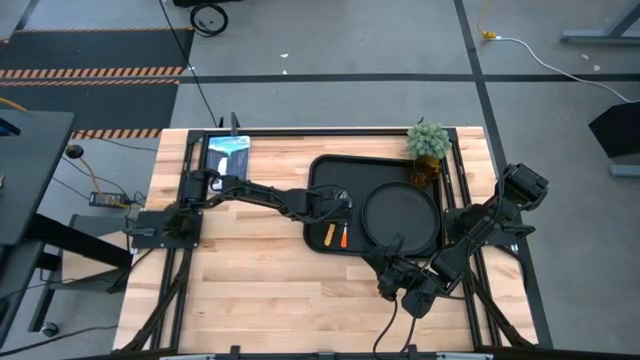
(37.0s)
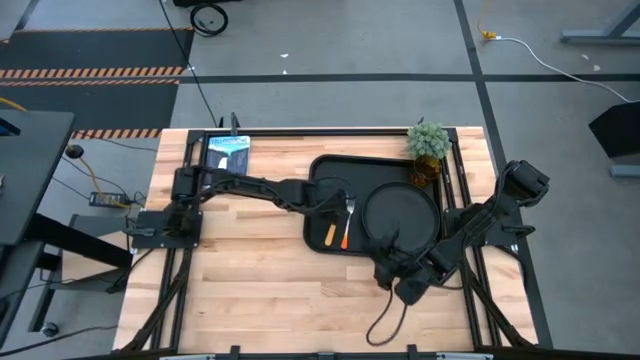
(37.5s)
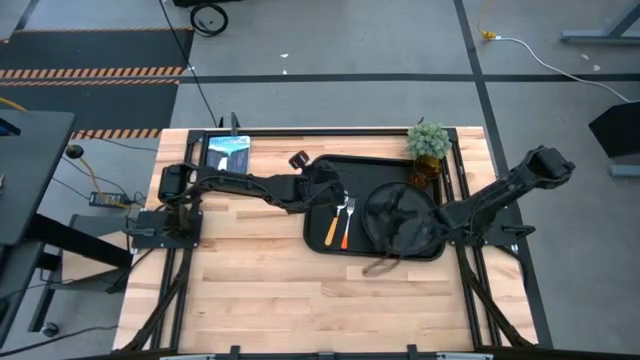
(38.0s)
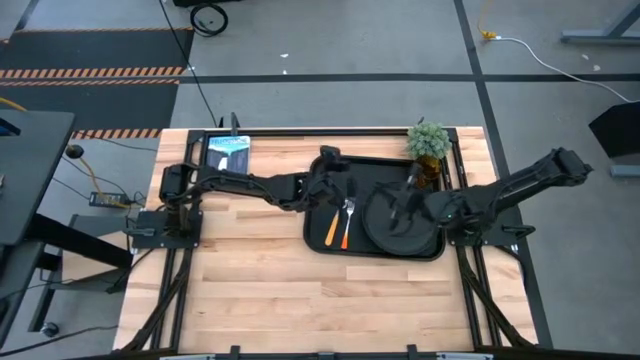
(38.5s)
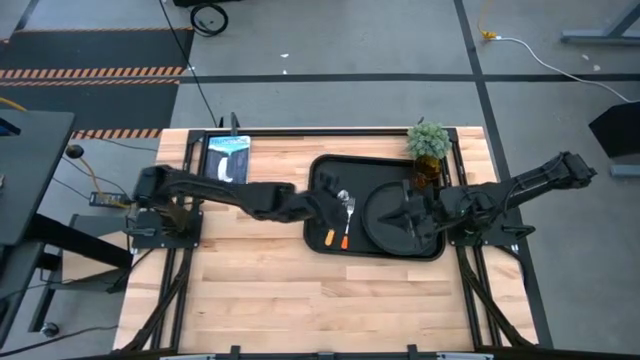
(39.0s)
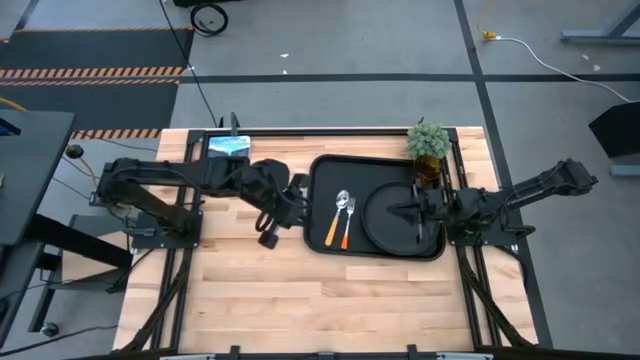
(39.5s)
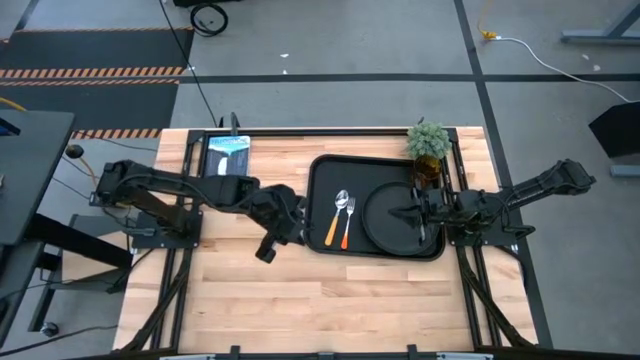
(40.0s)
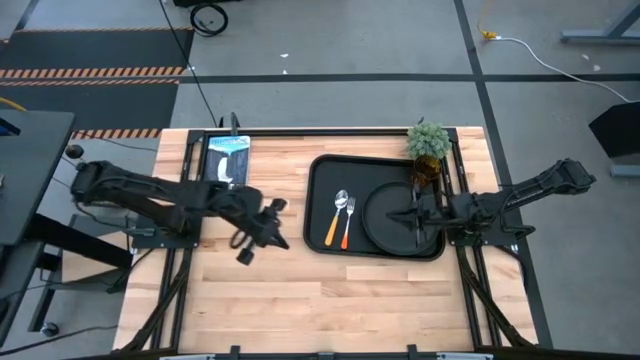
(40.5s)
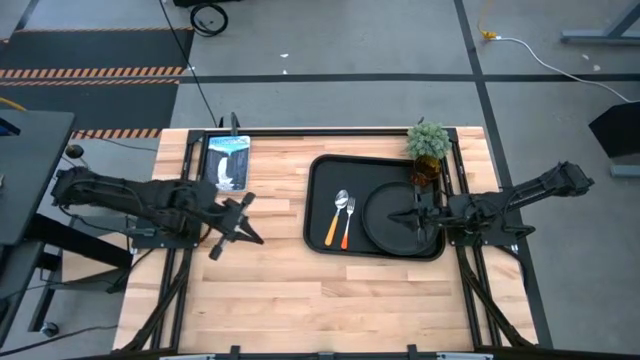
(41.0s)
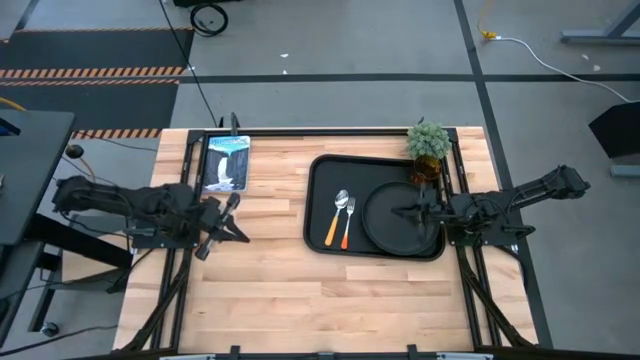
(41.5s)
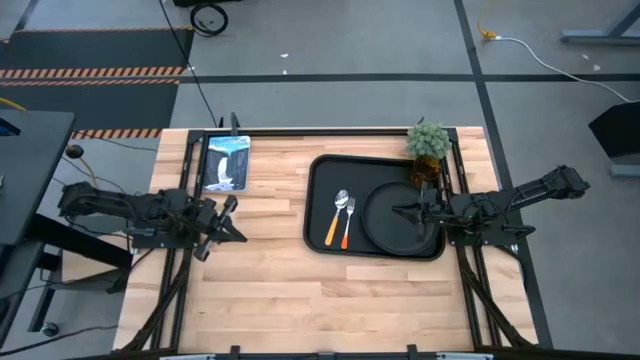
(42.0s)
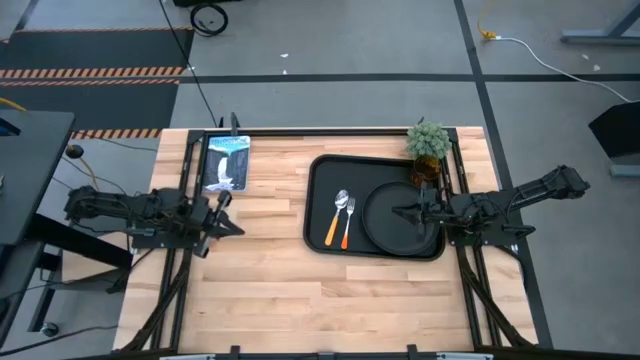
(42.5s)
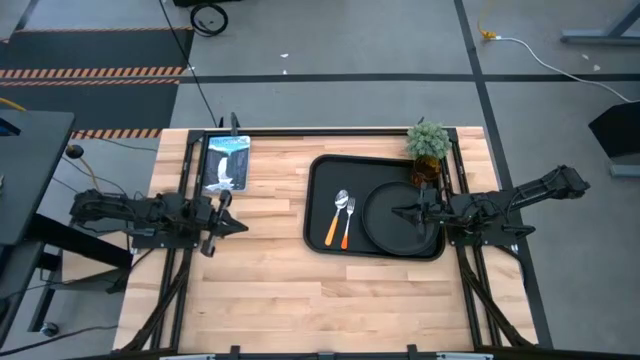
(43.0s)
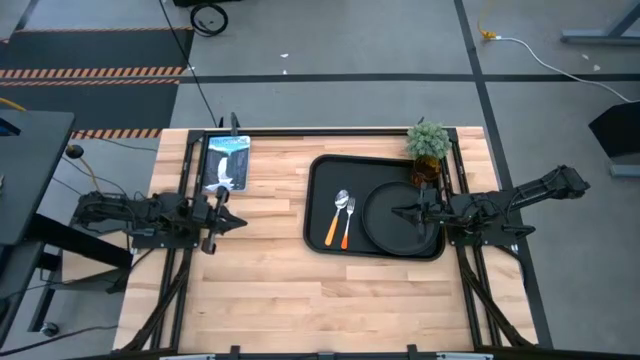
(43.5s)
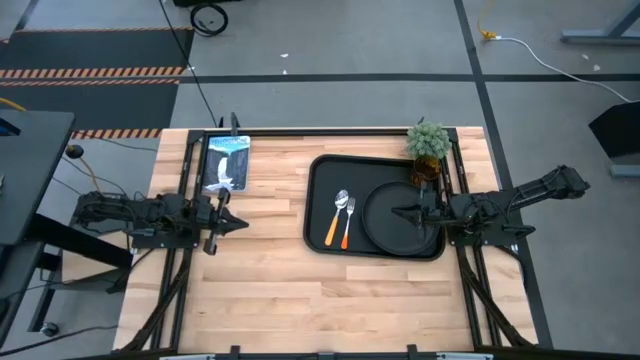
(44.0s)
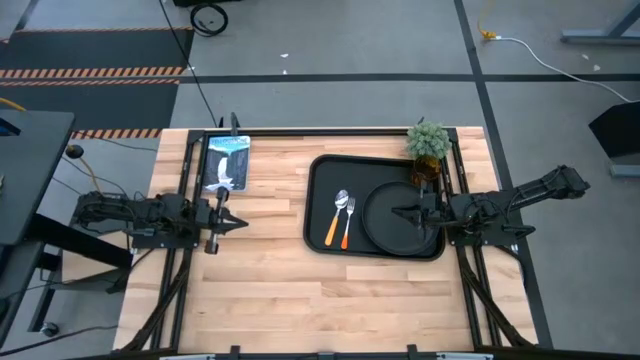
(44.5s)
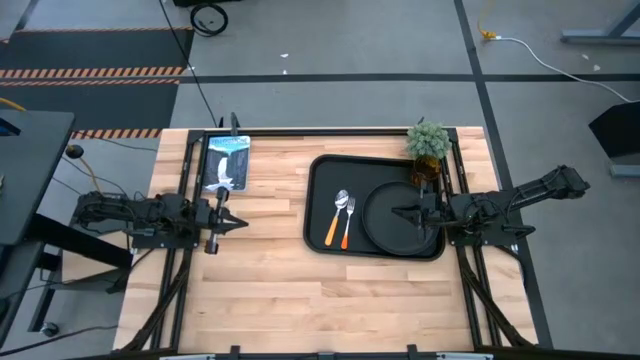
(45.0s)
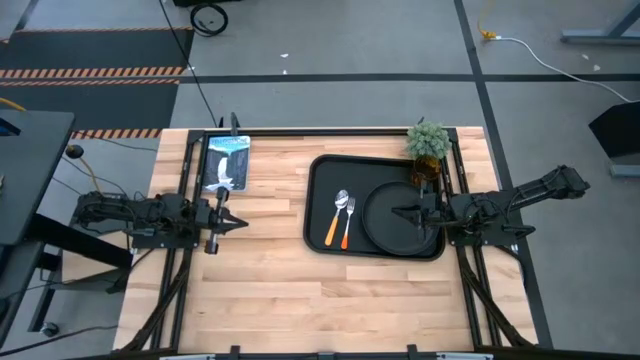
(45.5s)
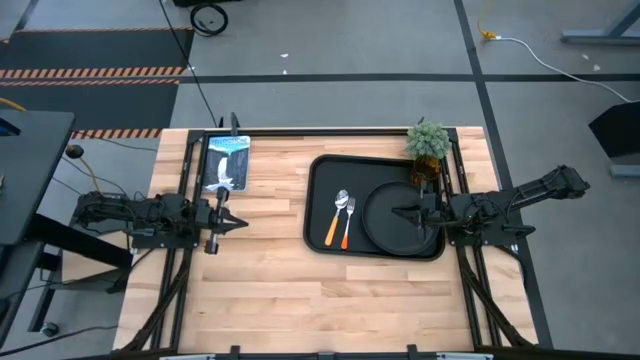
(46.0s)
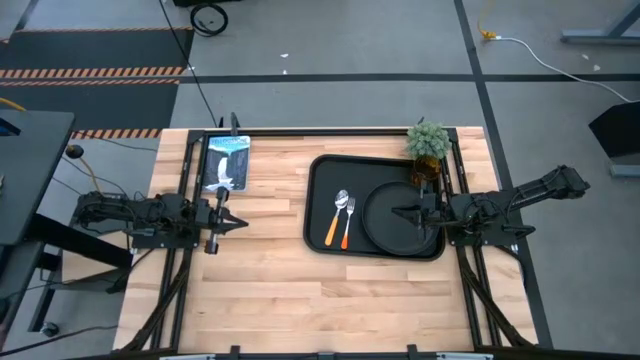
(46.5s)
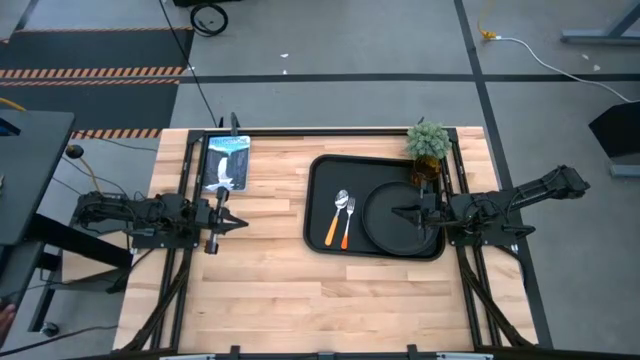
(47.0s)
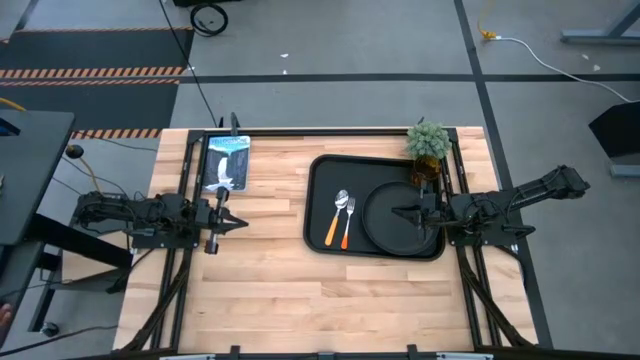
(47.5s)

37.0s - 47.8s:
Task: Pick and place plate/cup/fork/spoon on tray
Return to Home Position

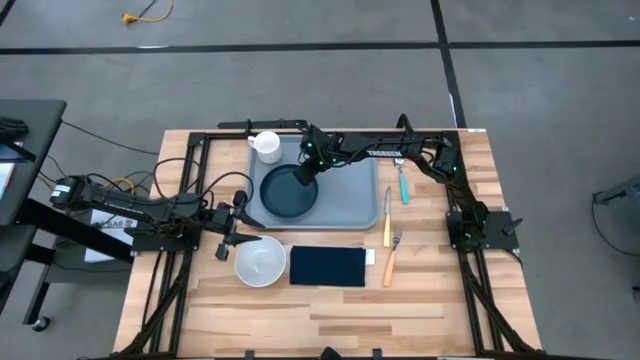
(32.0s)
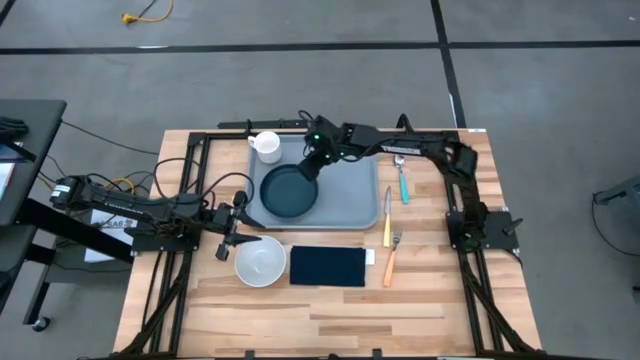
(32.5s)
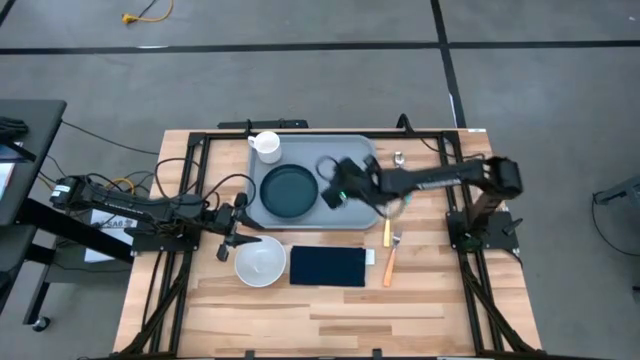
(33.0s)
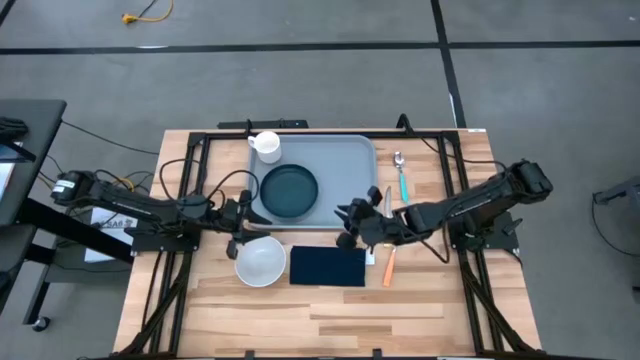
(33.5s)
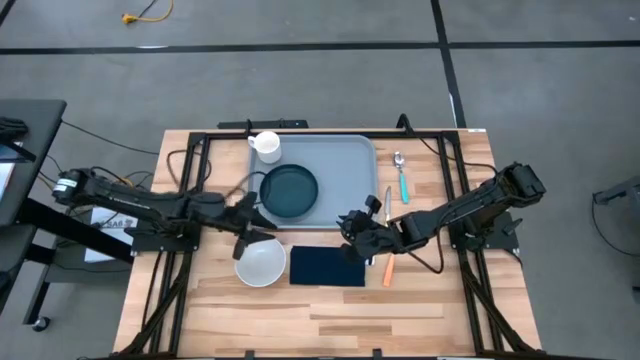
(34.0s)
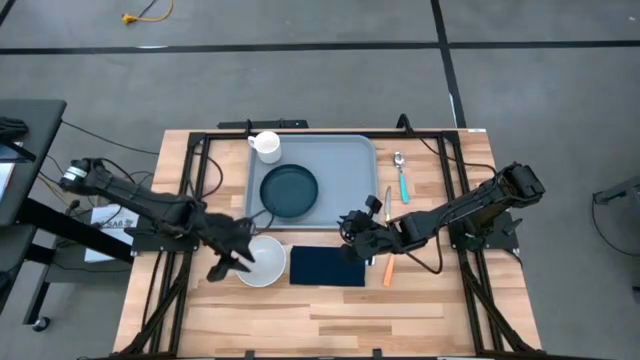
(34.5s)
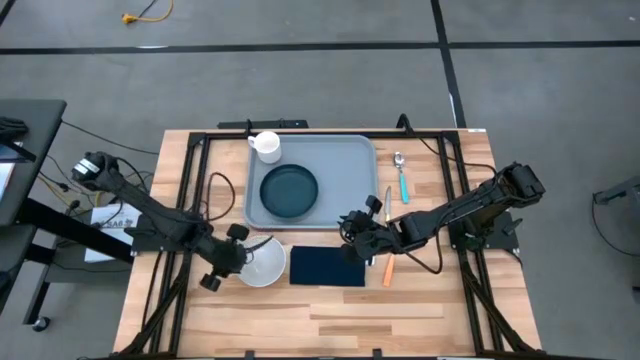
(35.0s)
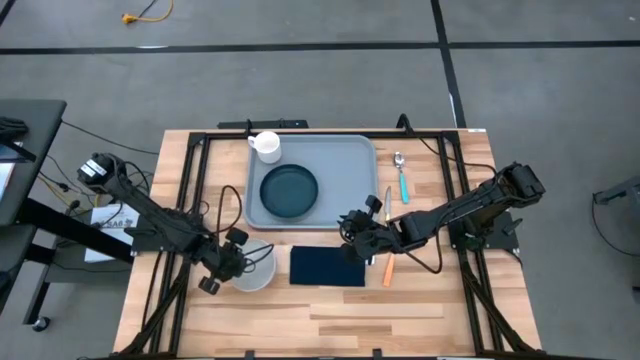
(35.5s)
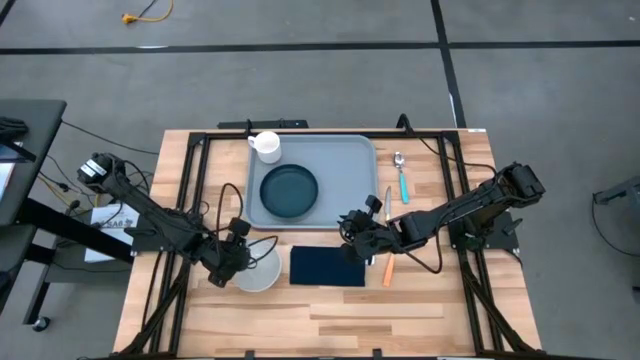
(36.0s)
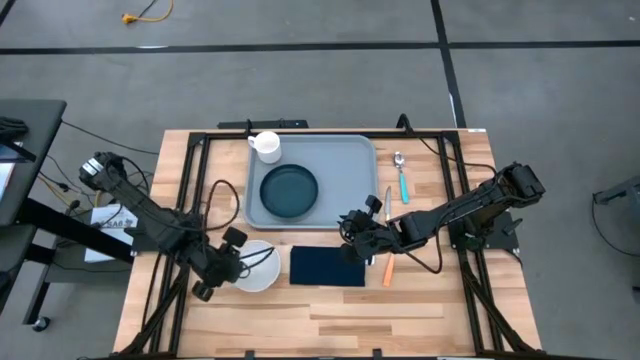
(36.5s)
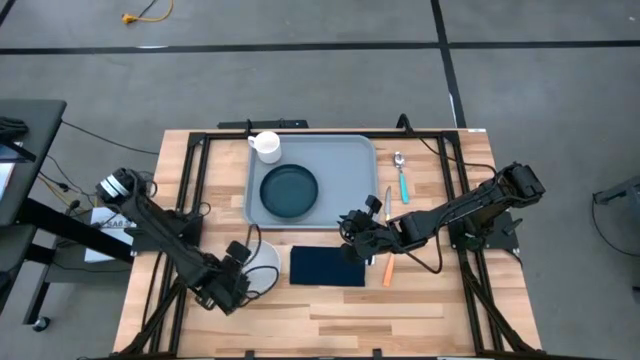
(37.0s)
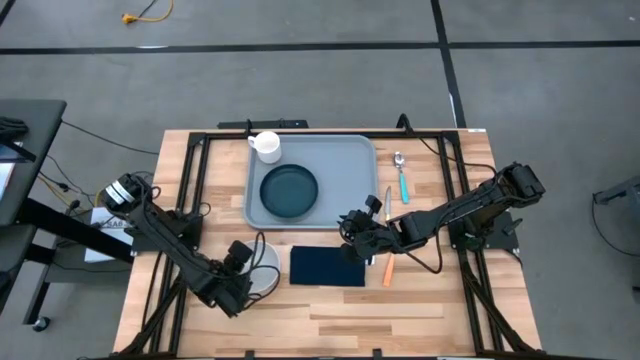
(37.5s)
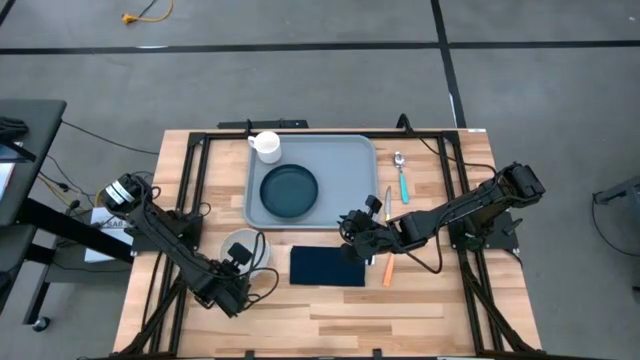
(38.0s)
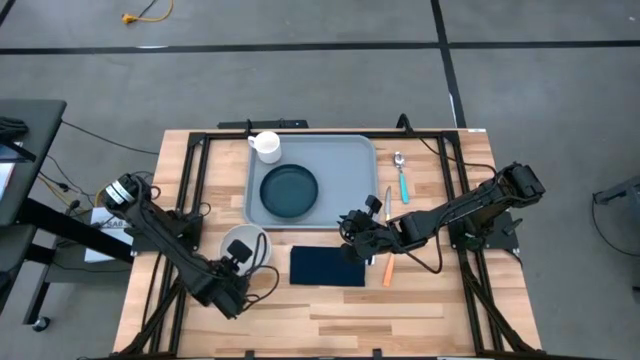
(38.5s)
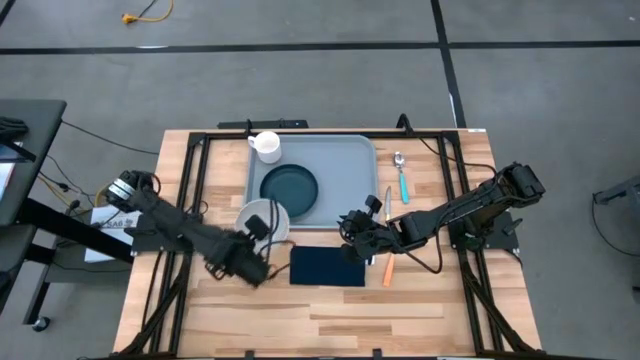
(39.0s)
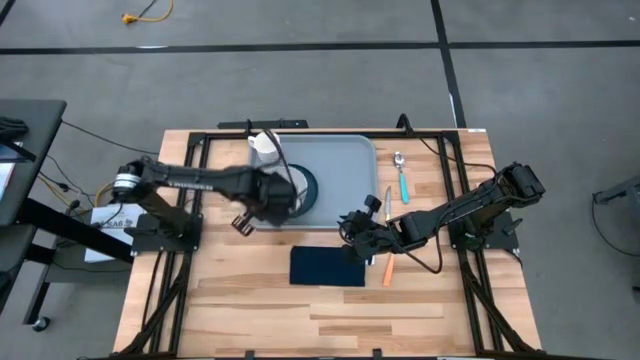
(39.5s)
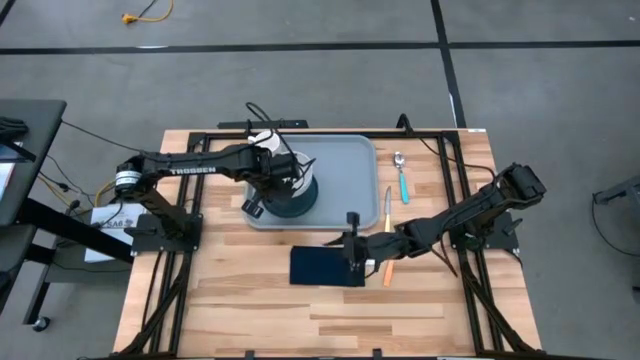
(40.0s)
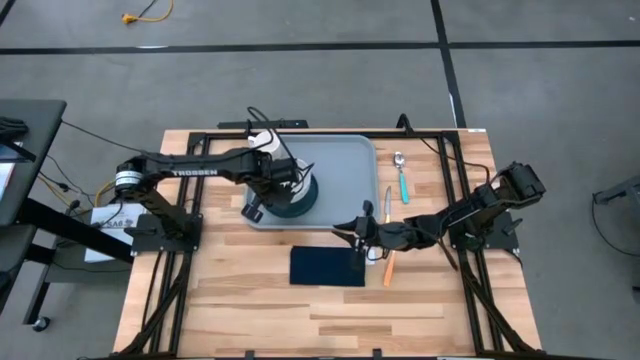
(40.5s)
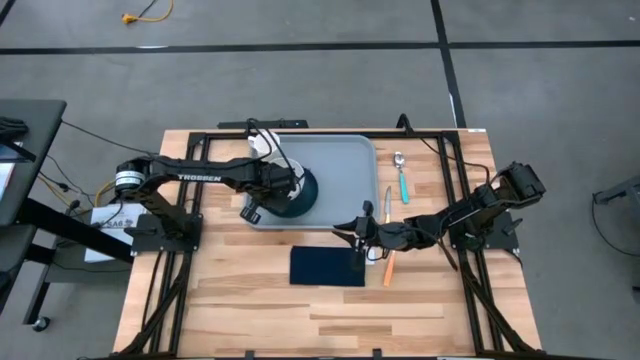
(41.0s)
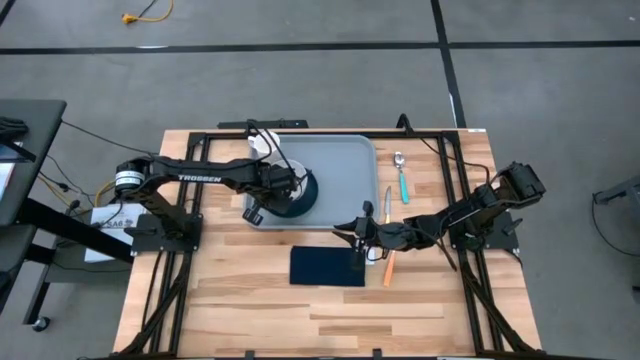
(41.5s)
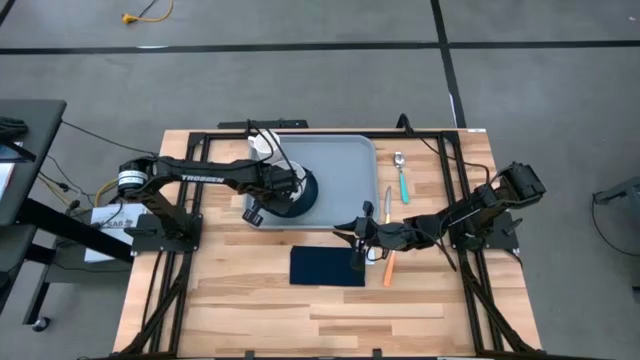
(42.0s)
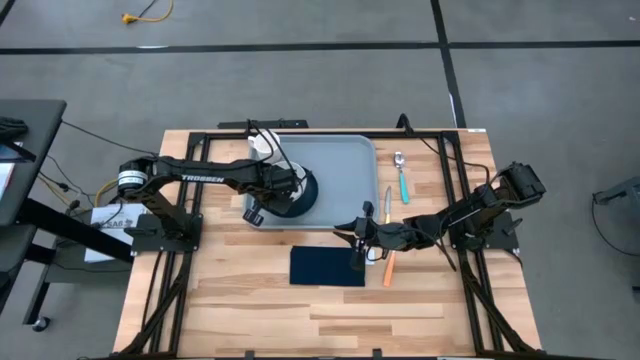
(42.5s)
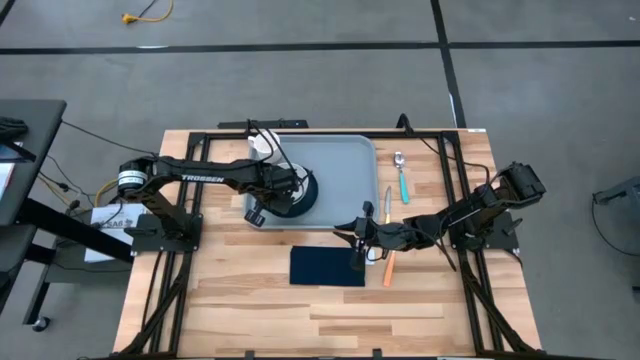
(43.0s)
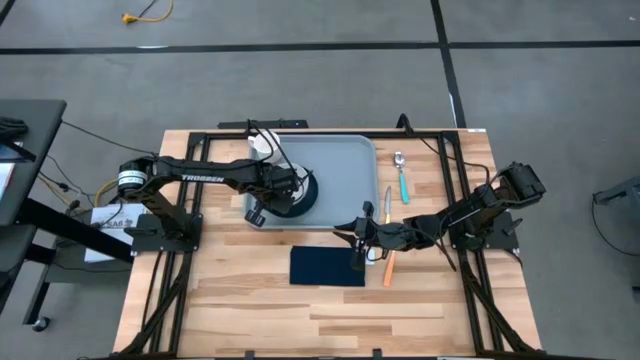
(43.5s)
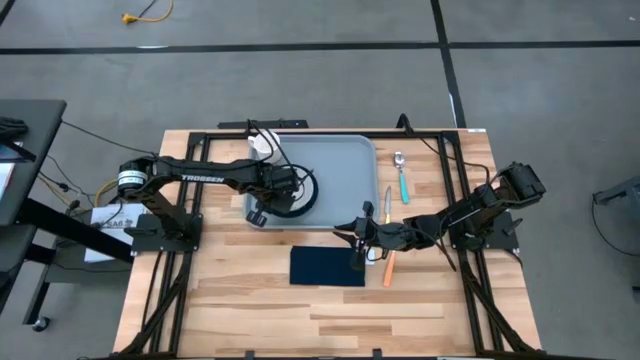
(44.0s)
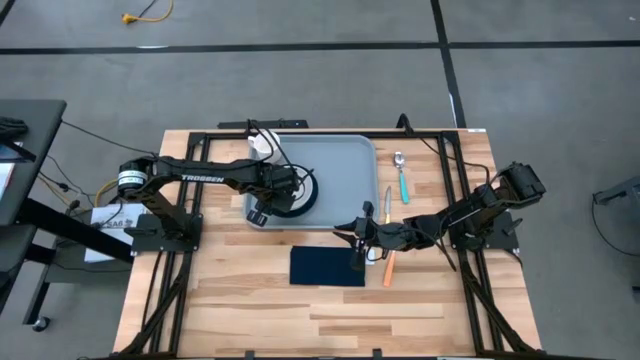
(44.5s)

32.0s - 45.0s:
Task: Set up tray
Put the white bowl on the black plate
